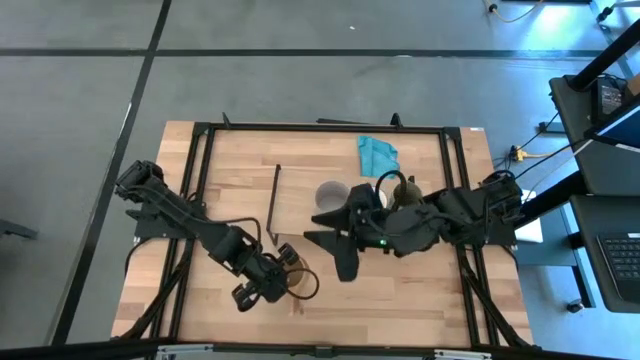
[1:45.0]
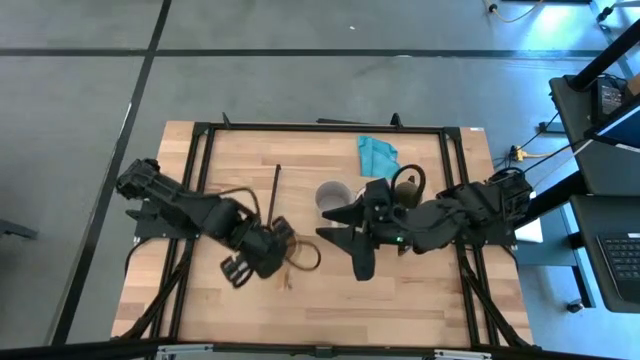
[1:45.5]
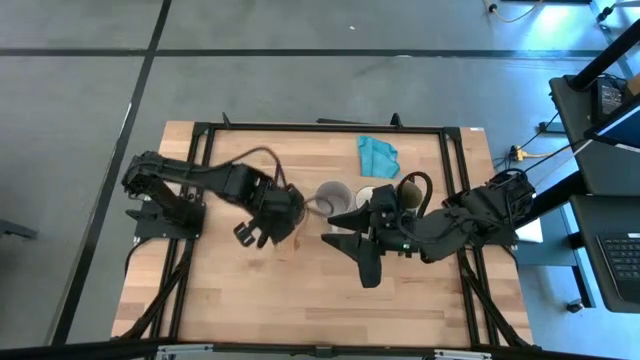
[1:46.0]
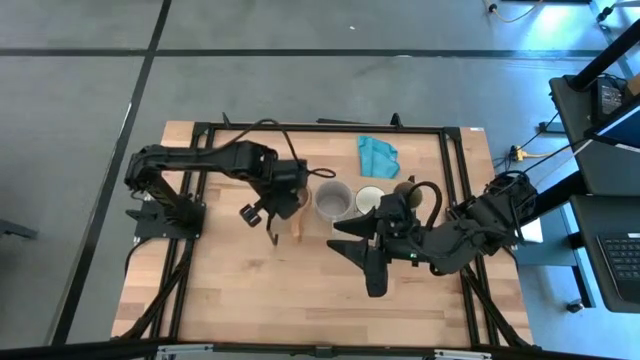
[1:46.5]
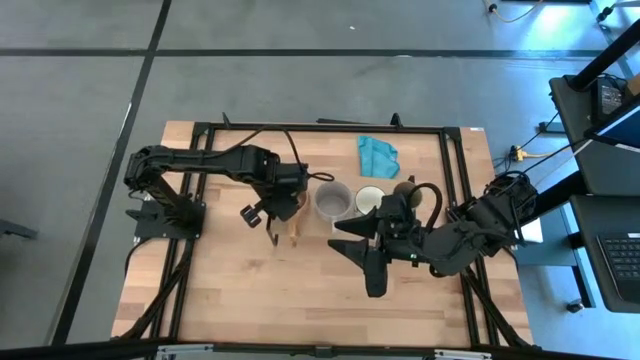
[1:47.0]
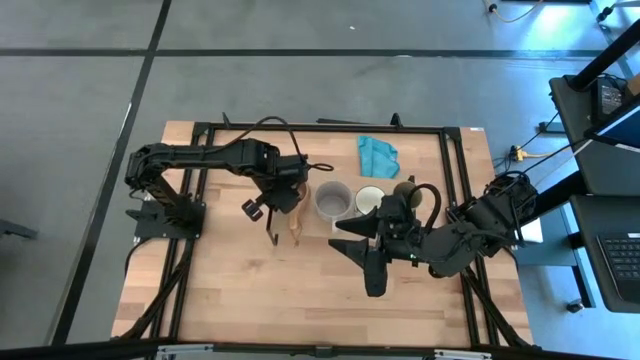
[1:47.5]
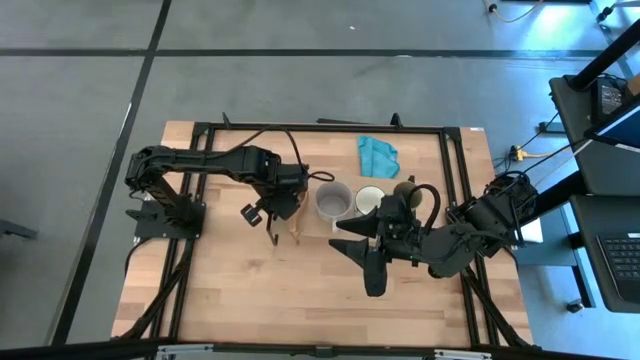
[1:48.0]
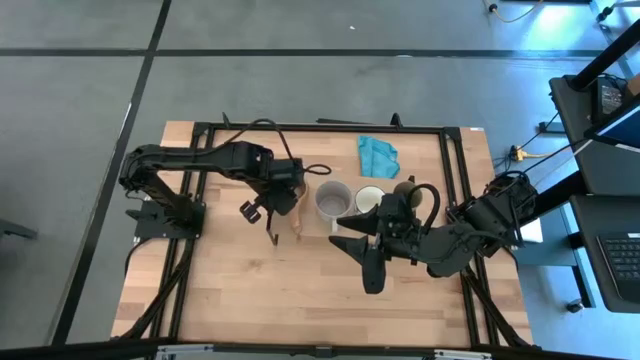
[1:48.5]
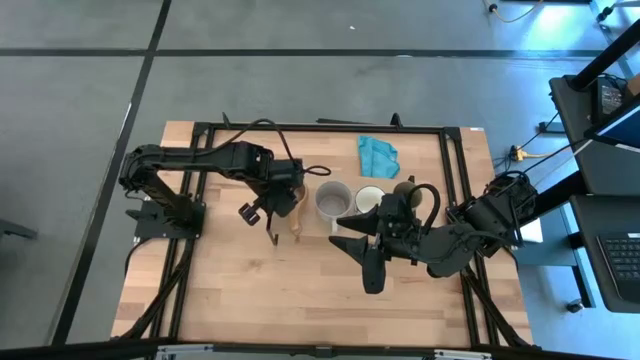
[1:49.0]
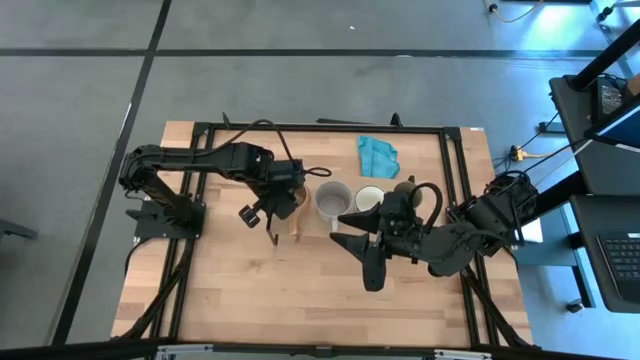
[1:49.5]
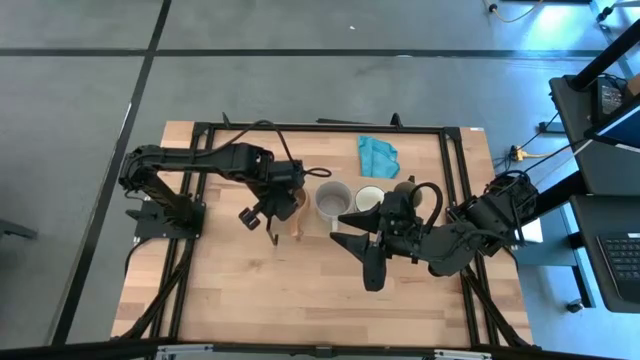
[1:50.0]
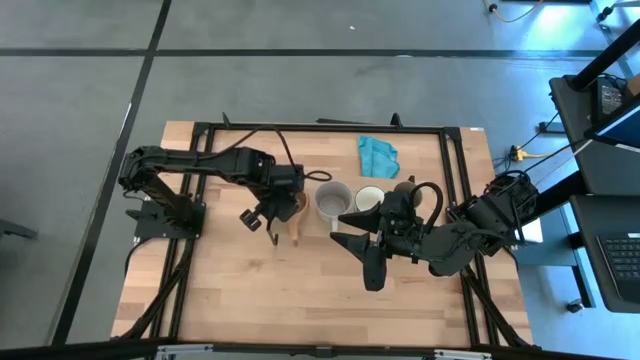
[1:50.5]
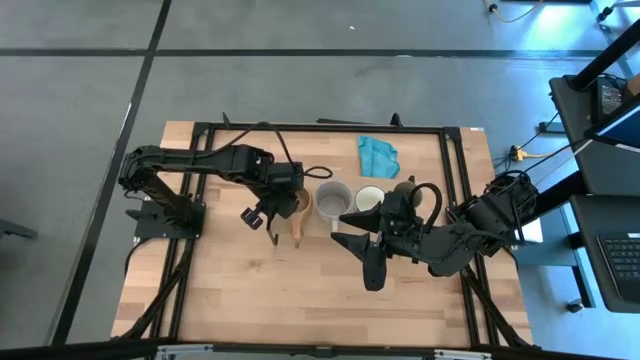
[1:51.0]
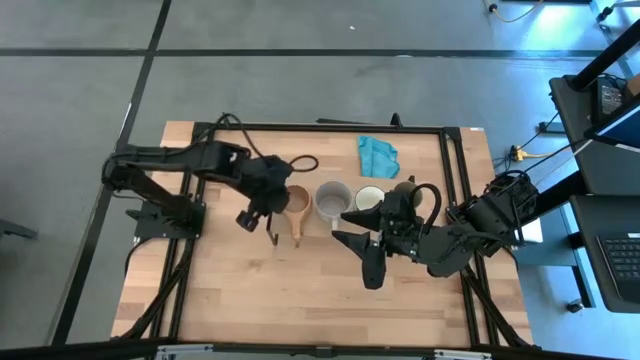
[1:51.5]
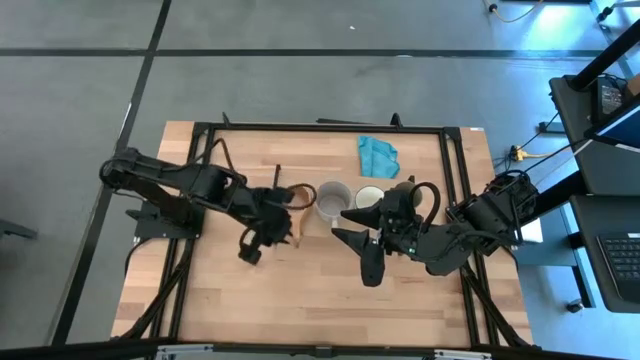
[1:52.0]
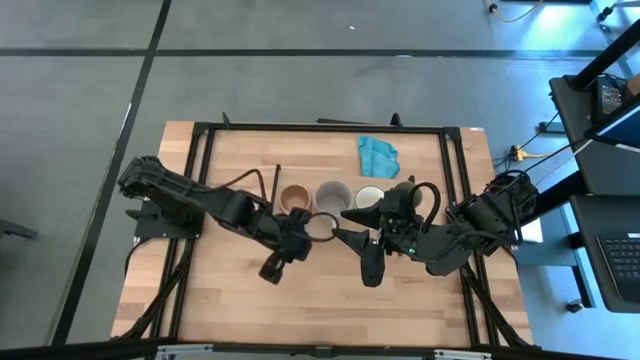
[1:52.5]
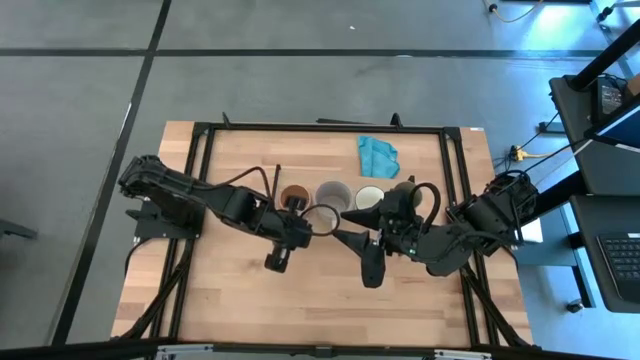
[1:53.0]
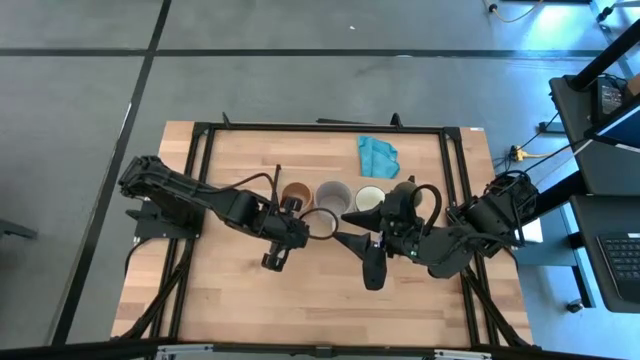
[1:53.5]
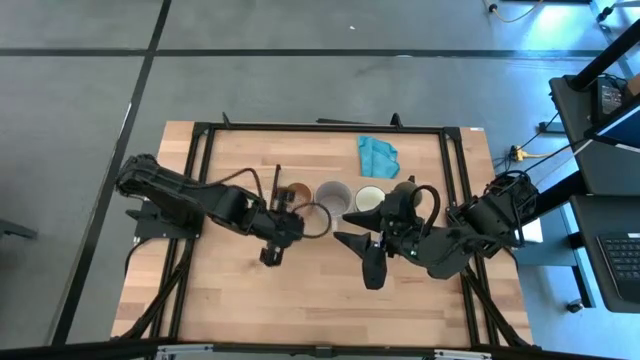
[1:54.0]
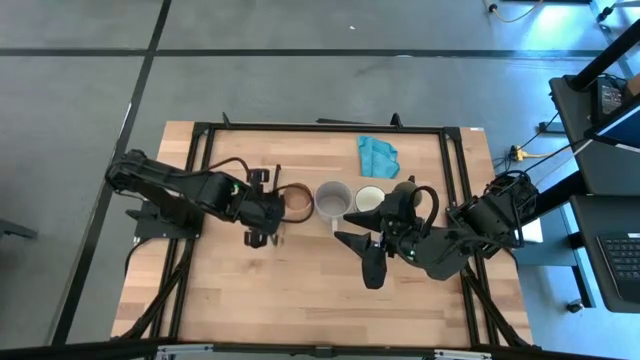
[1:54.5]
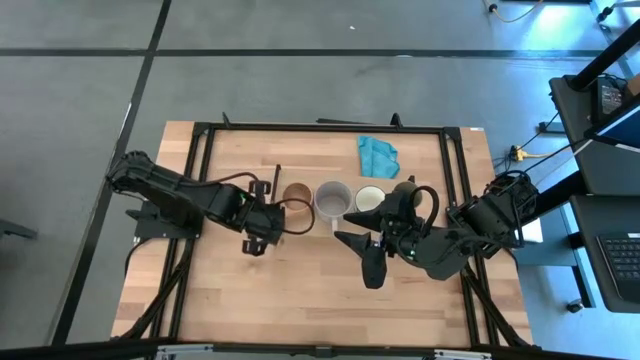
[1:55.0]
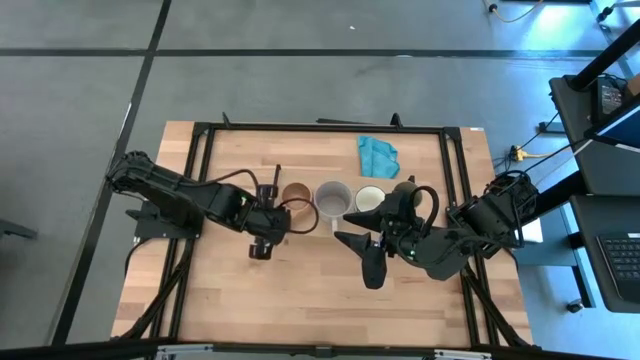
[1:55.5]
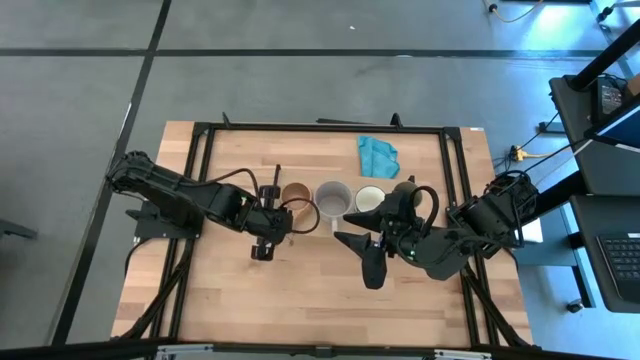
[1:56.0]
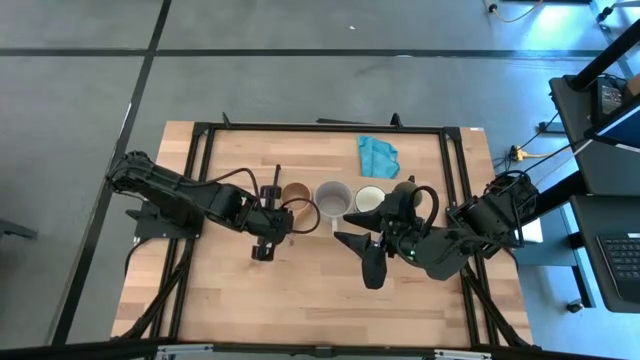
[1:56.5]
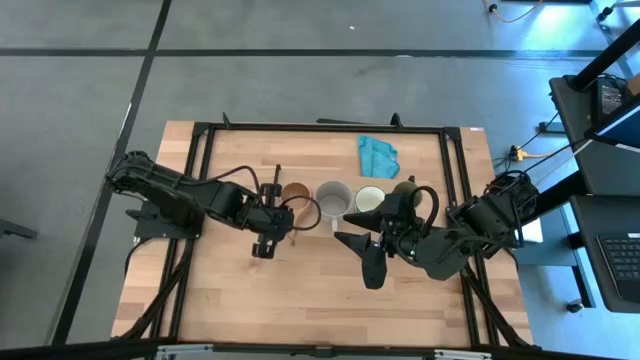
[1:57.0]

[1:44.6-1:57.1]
Task: Stack small to large cups/mugs on shelf
Put the brown wooden mug on the shelf

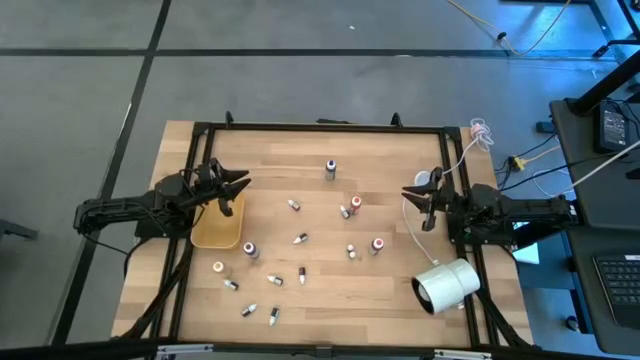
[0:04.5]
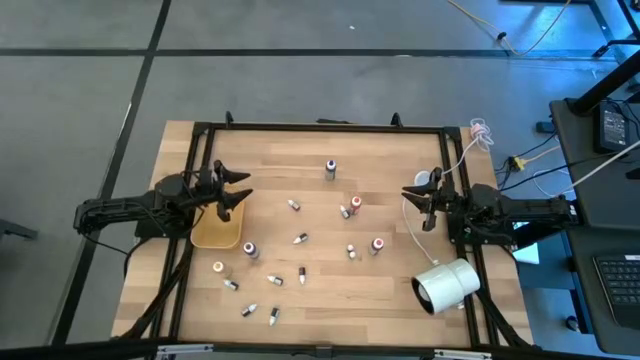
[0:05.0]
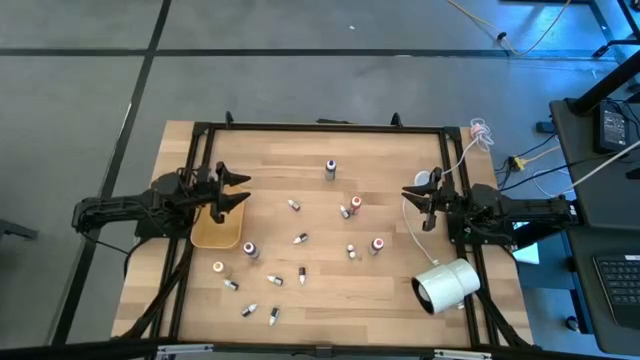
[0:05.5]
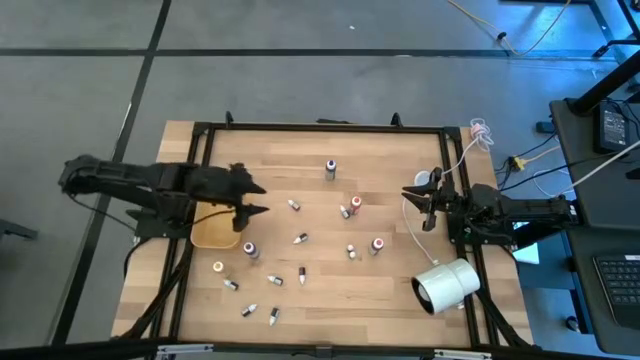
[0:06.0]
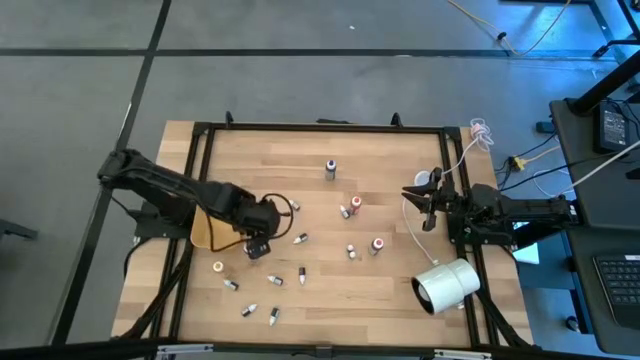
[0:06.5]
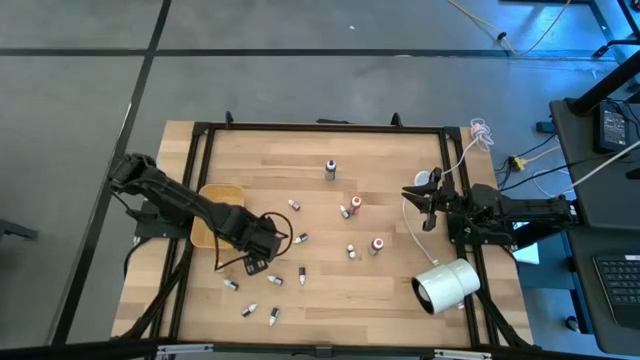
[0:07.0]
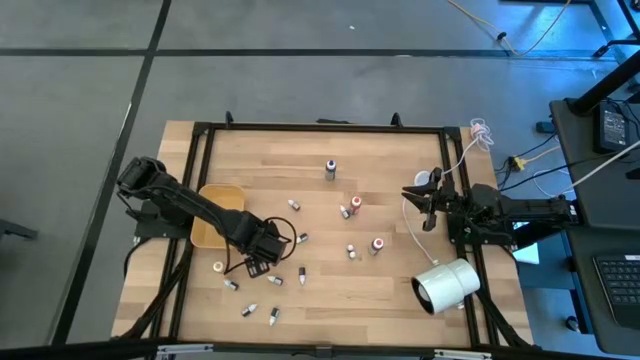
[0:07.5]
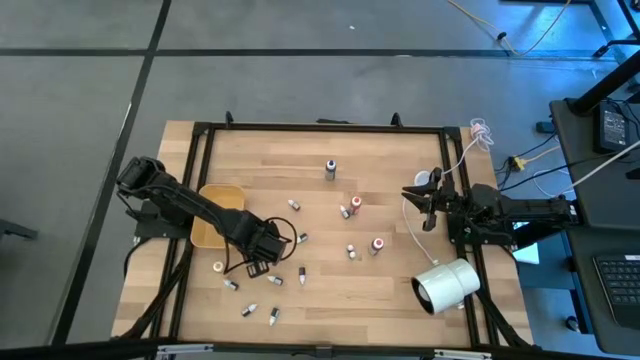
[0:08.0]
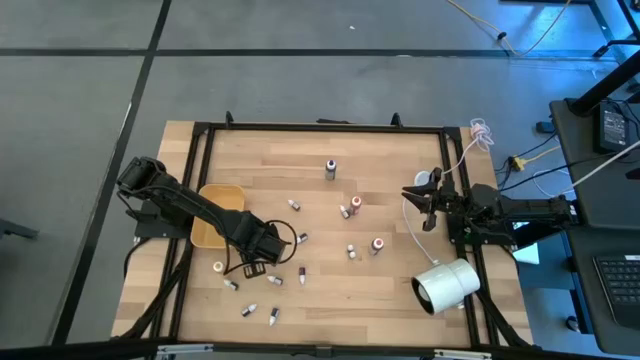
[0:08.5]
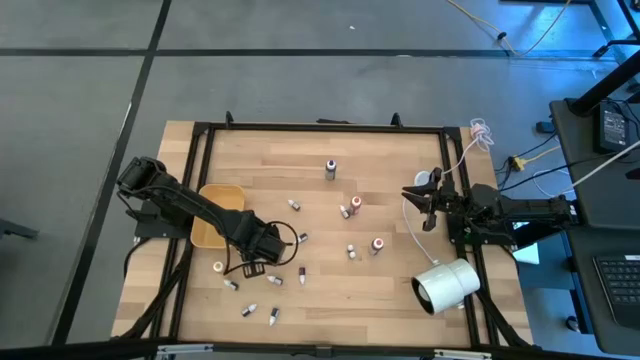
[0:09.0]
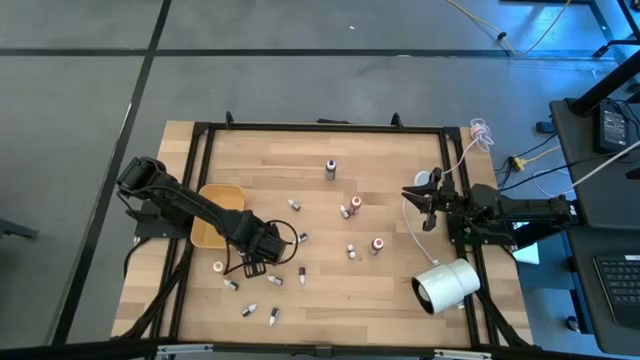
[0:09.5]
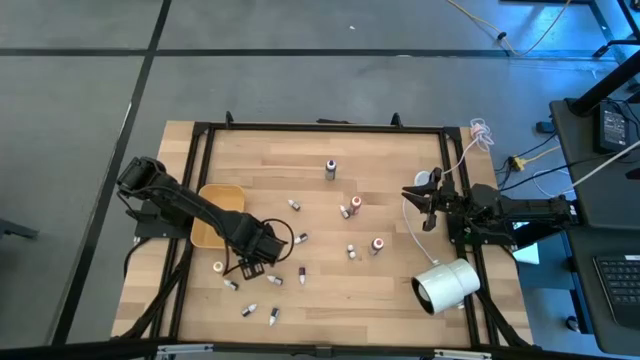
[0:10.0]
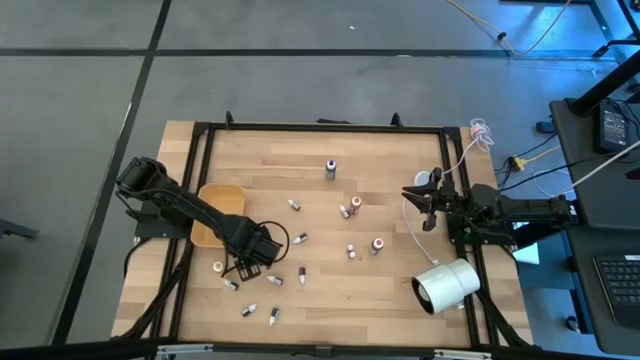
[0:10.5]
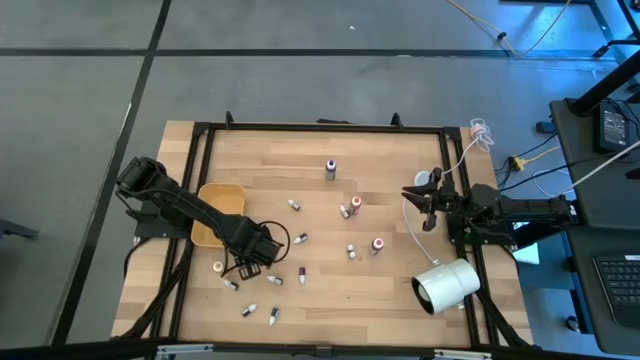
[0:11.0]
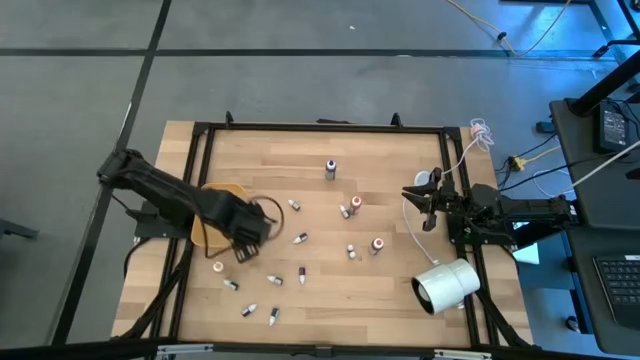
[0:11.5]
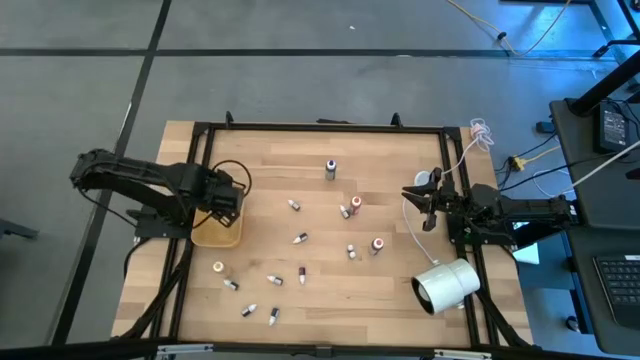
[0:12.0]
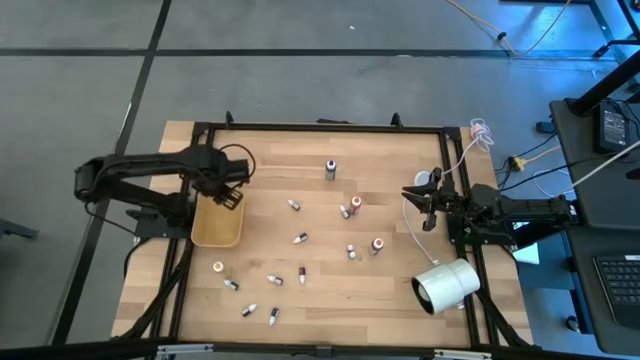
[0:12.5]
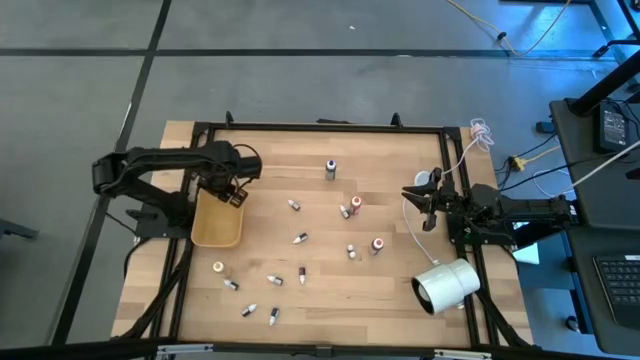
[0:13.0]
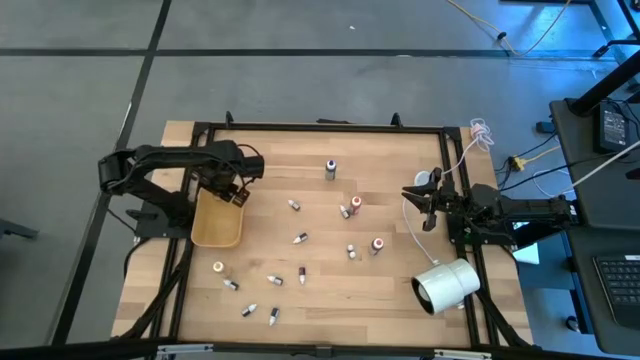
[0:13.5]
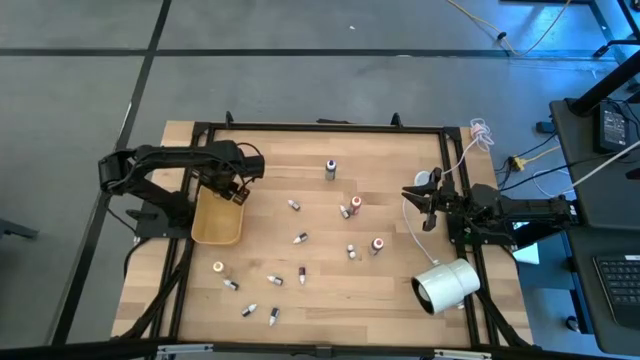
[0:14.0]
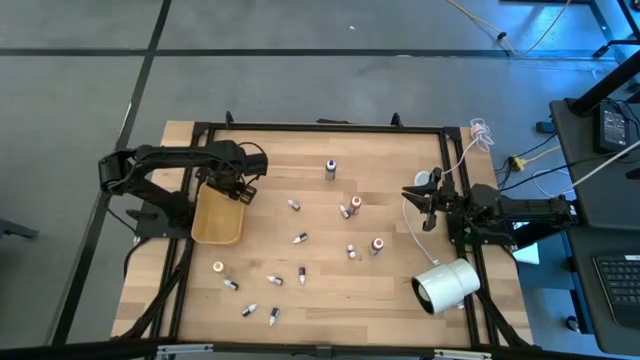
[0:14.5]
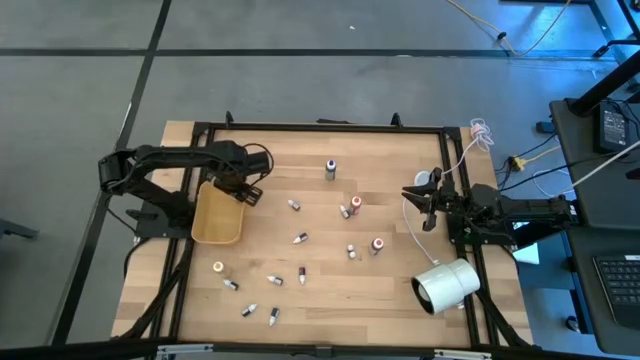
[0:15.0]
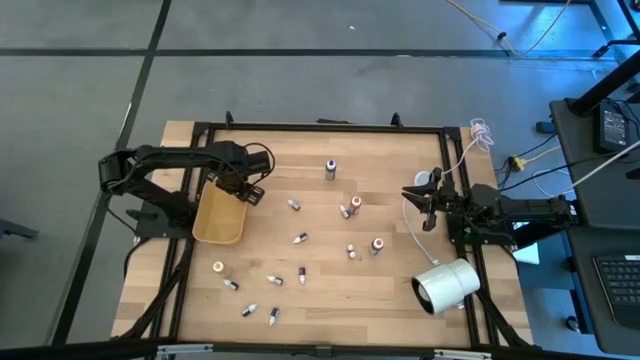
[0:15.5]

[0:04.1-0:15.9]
Task: Pick & Place food coloring
Put the large purple food coloring bottle into the yellow bin
